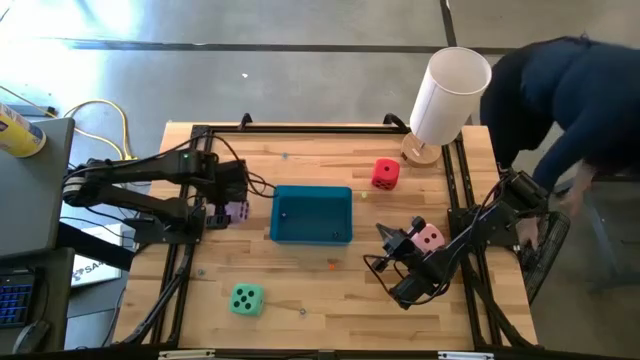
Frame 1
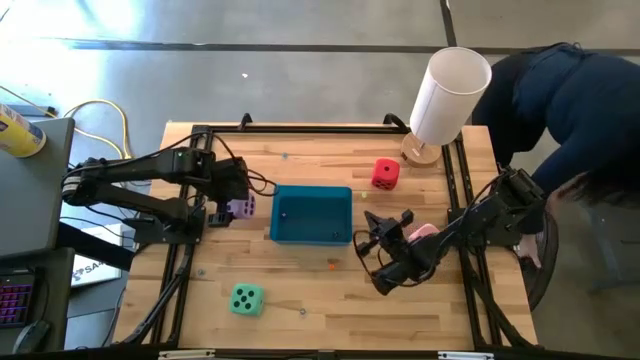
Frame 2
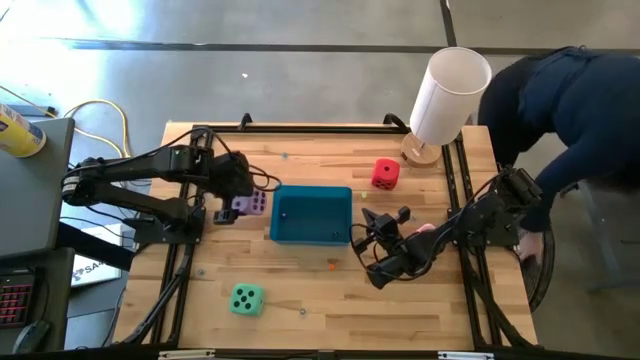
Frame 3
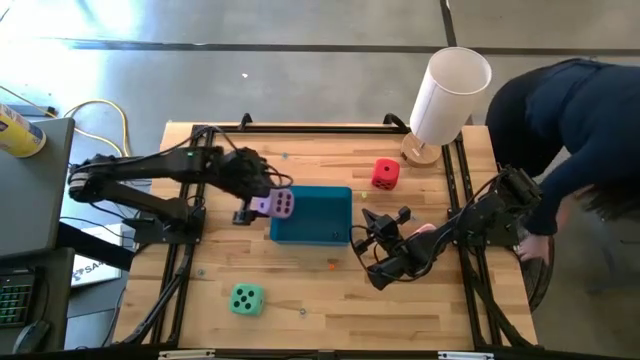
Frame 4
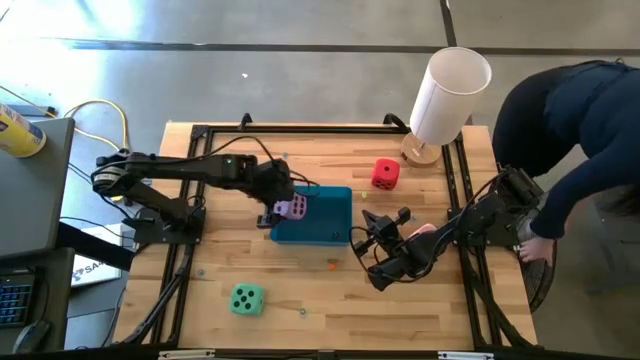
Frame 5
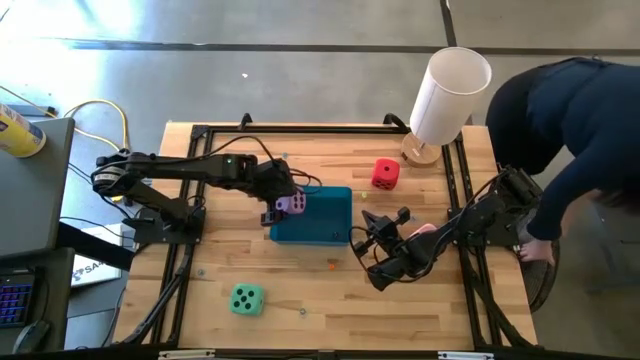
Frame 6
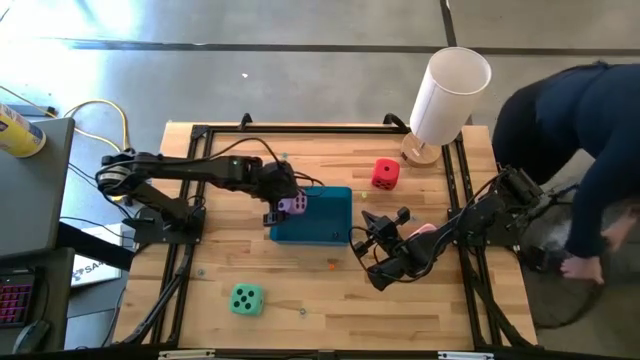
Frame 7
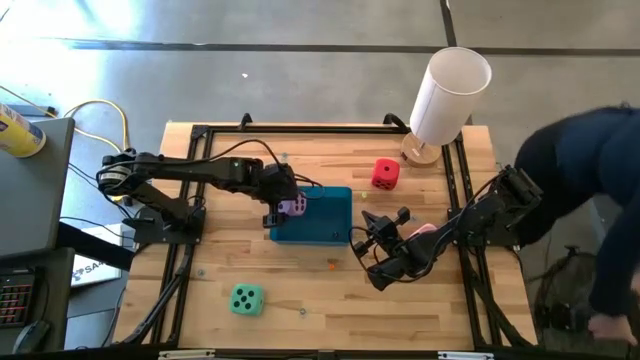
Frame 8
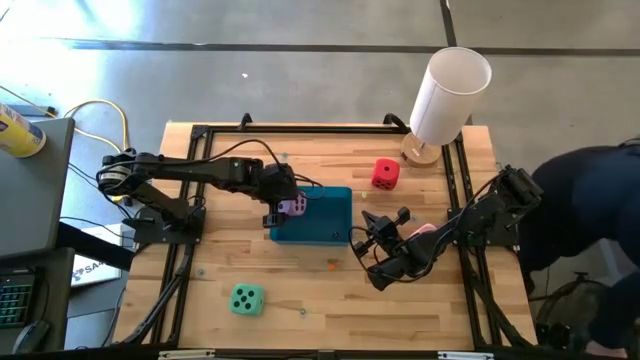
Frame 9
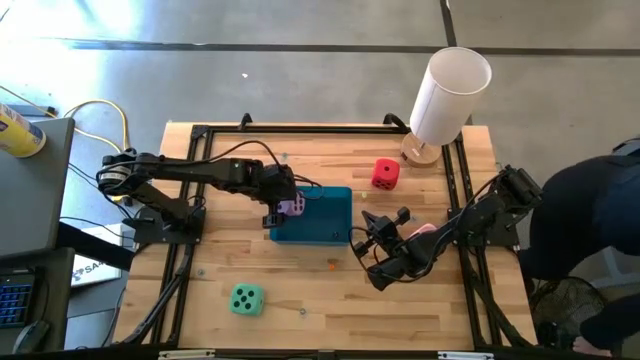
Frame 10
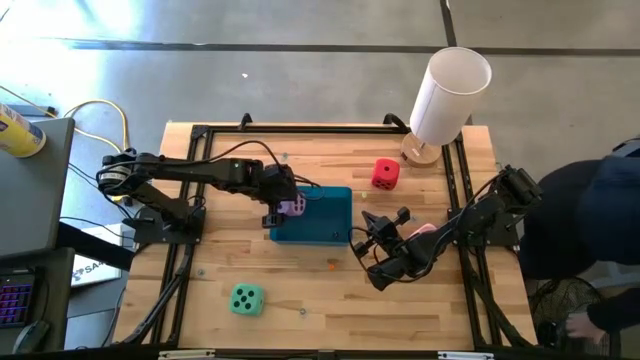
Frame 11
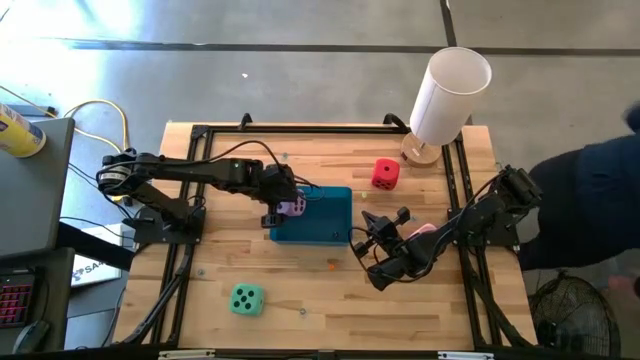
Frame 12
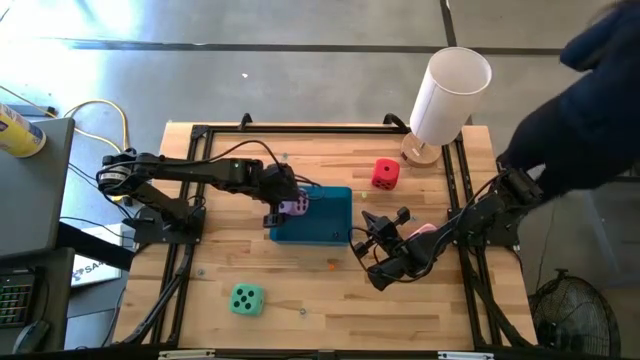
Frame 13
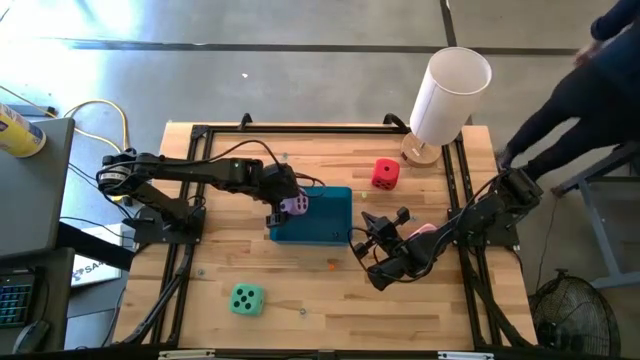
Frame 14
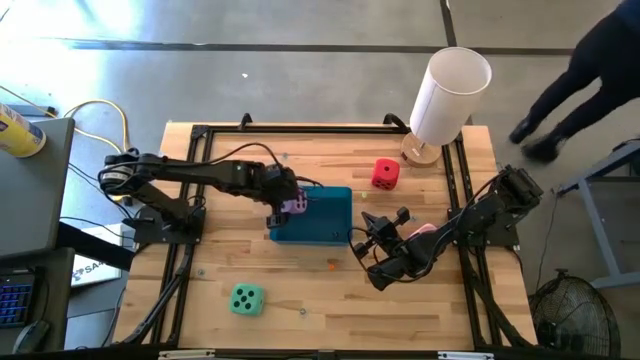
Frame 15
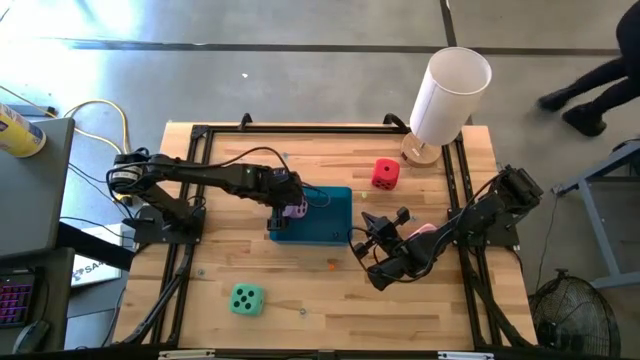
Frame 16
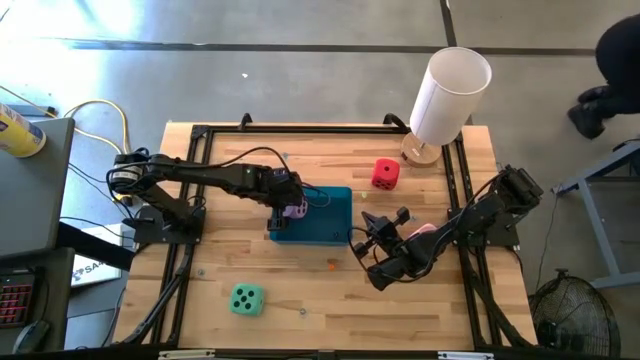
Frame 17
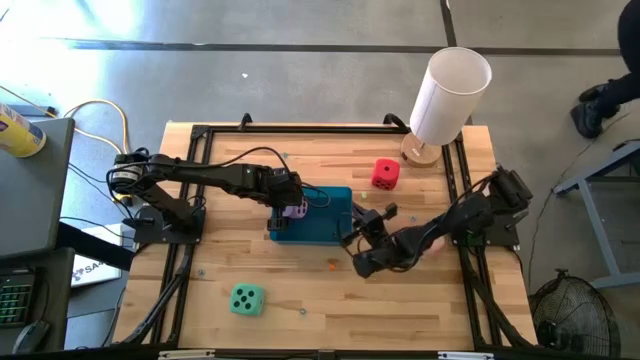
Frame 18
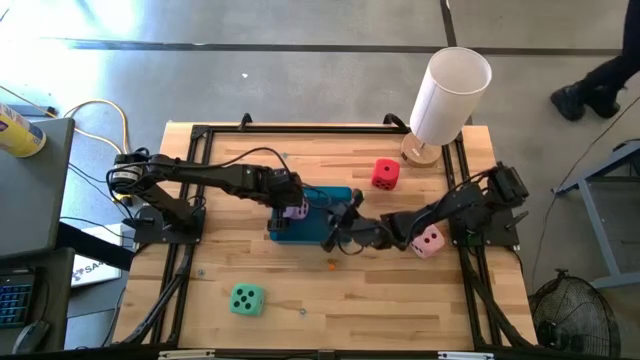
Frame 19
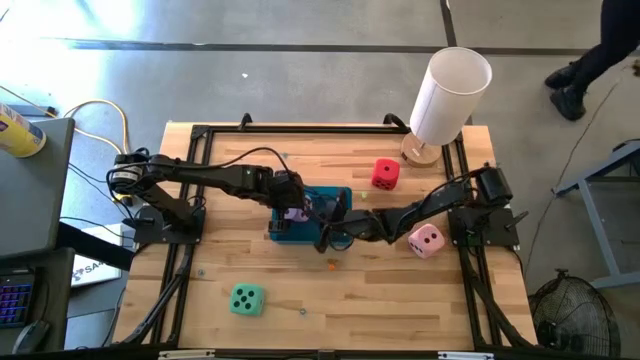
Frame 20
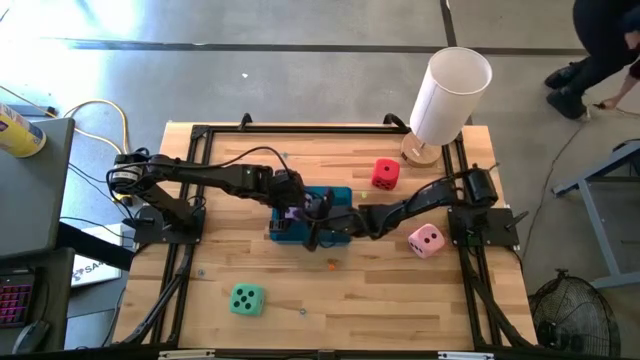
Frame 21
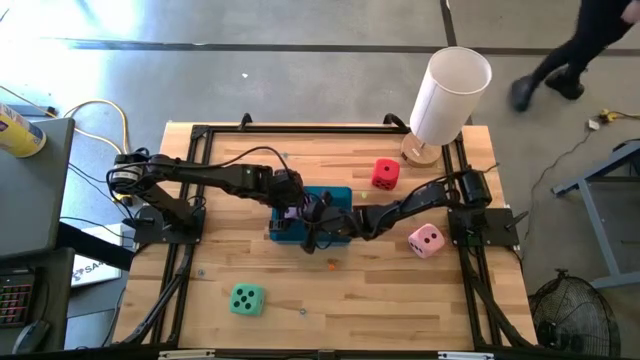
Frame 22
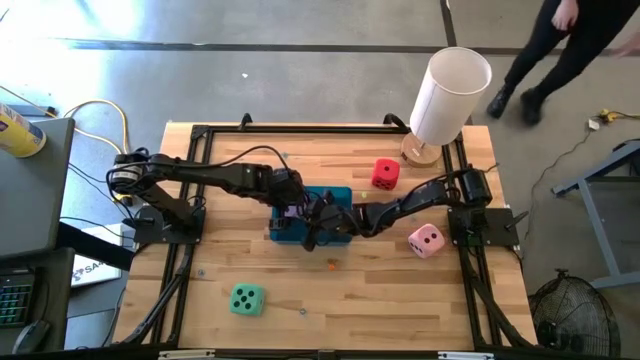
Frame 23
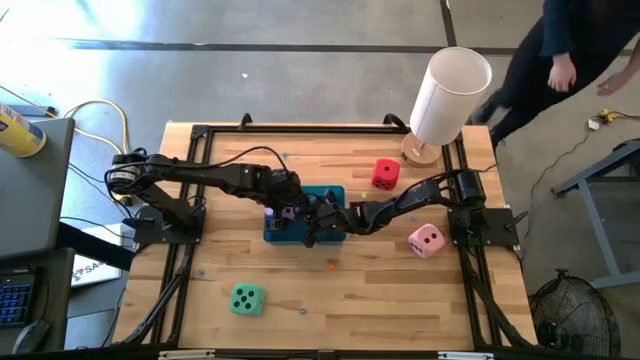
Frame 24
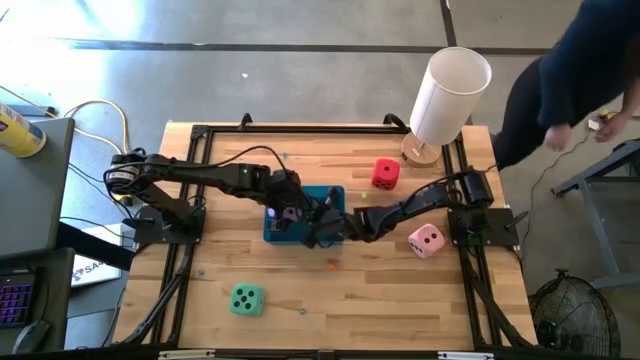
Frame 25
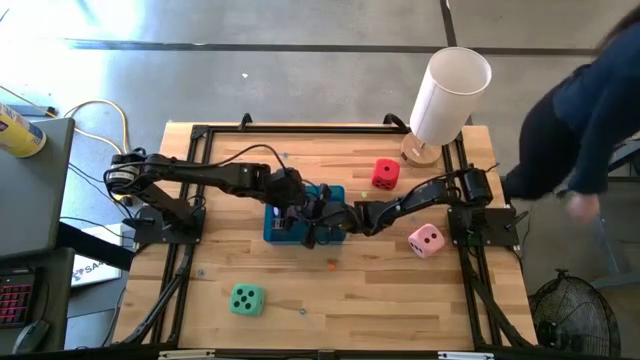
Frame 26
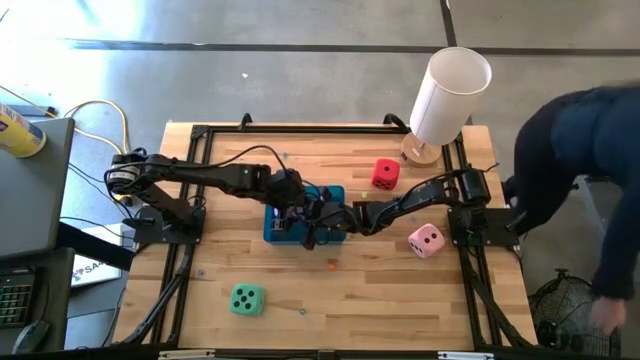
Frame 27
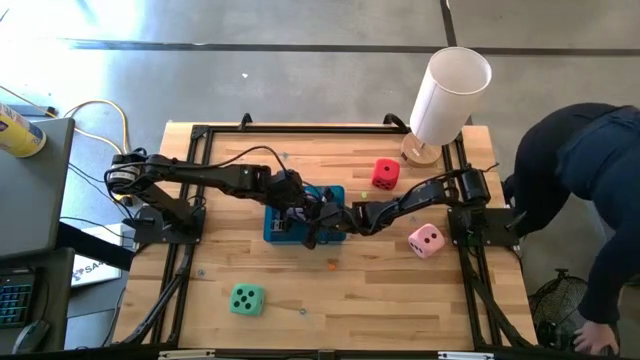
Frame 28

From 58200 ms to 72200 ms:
Task: Pick & Place Dice
Put the large violet dice into the blue bin

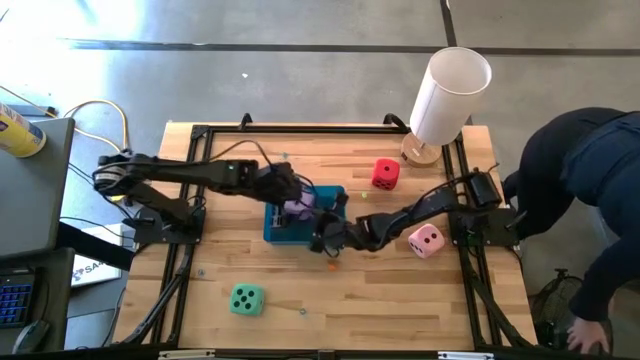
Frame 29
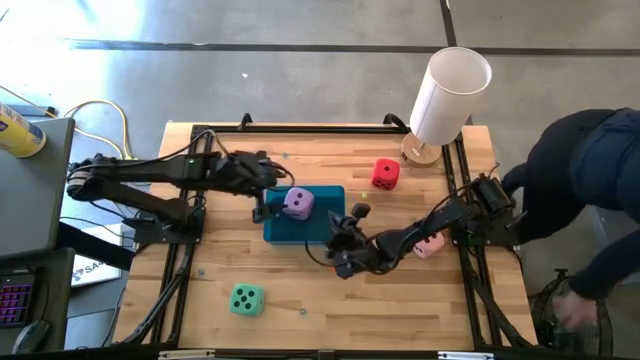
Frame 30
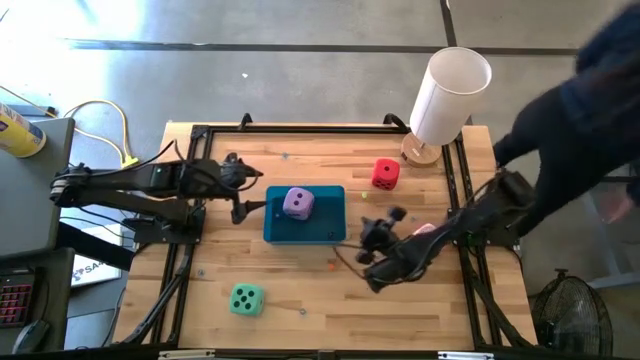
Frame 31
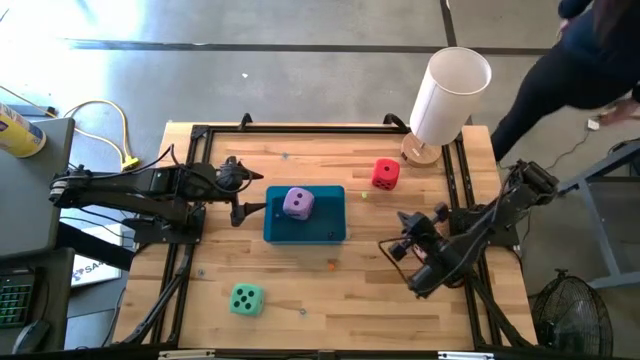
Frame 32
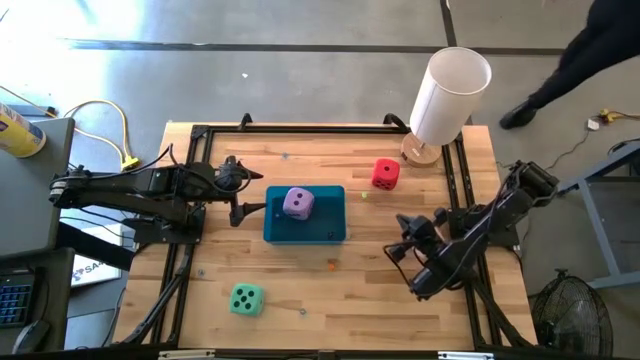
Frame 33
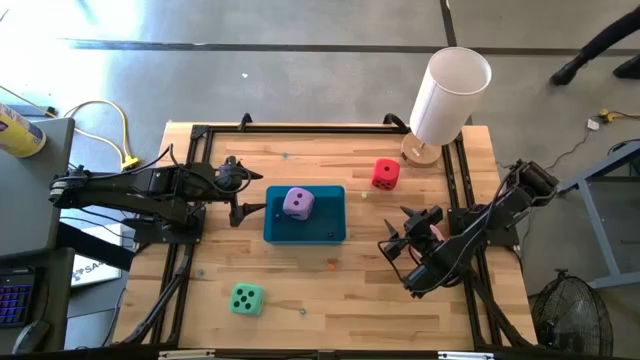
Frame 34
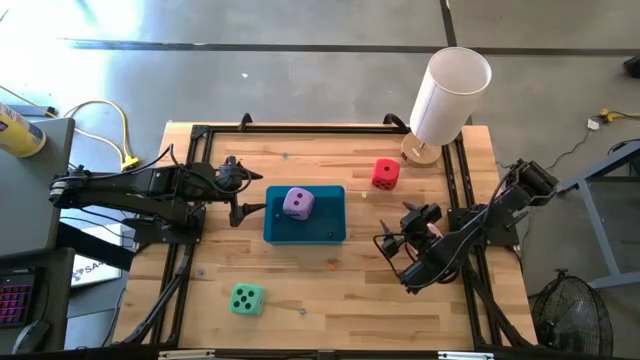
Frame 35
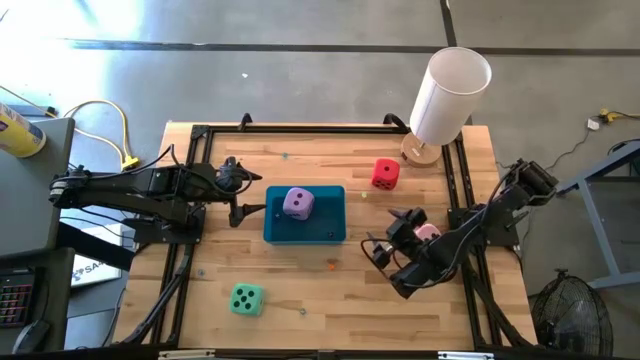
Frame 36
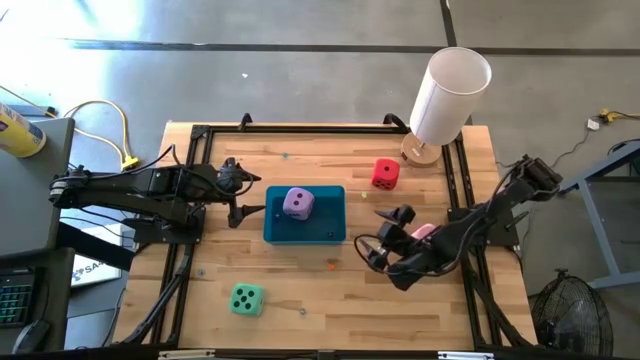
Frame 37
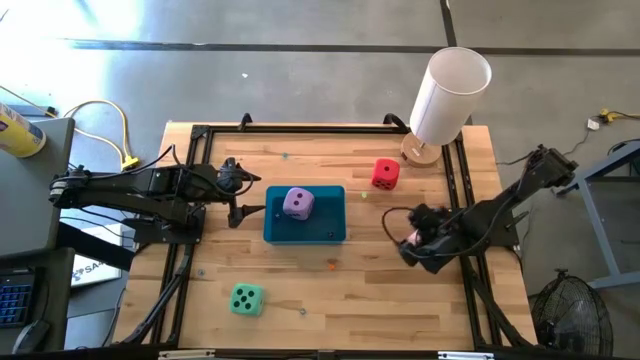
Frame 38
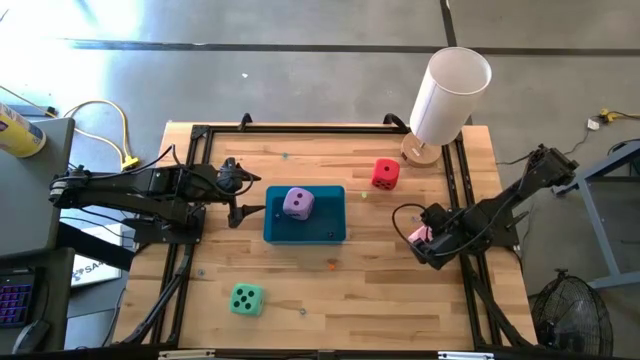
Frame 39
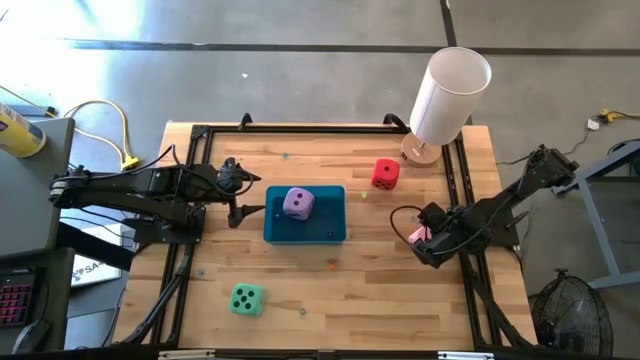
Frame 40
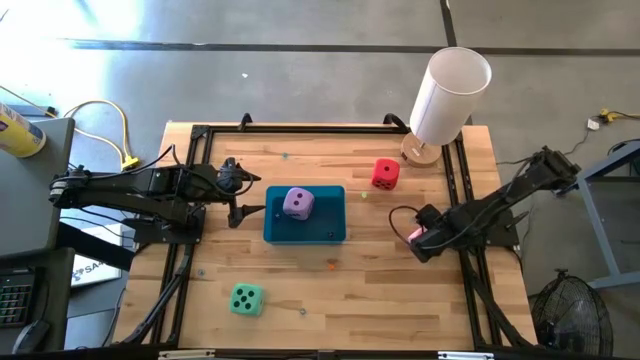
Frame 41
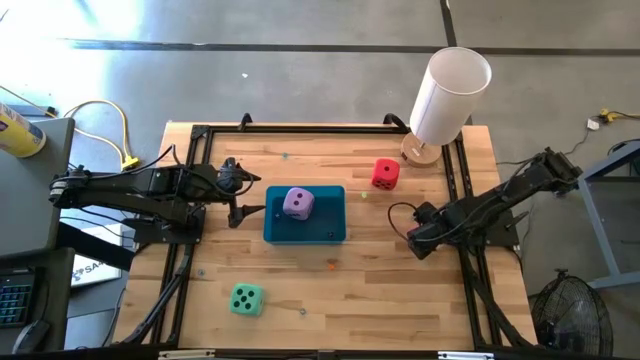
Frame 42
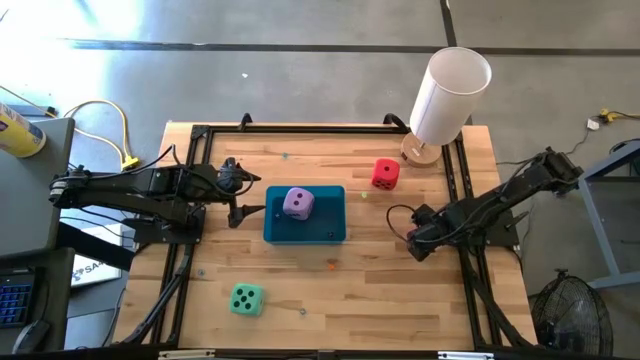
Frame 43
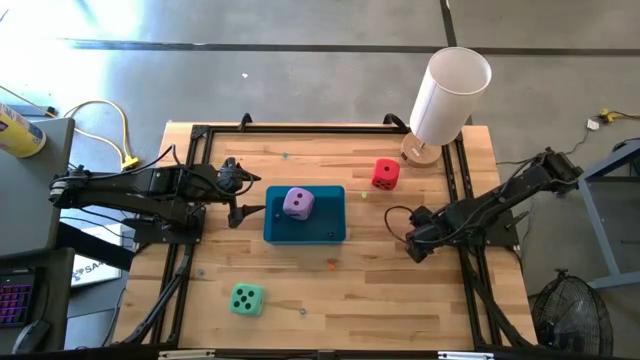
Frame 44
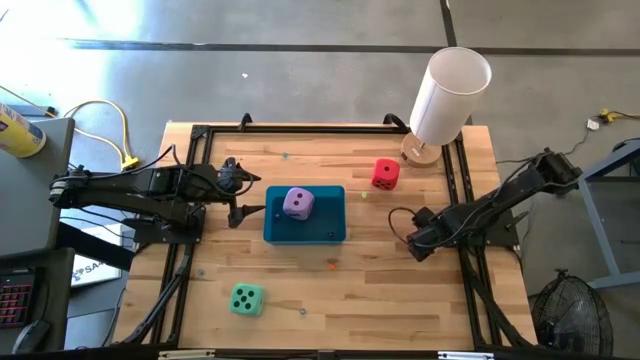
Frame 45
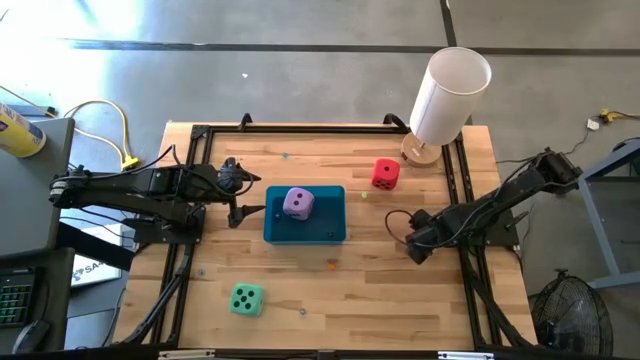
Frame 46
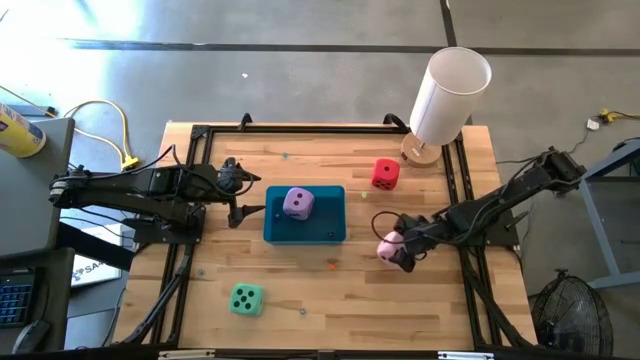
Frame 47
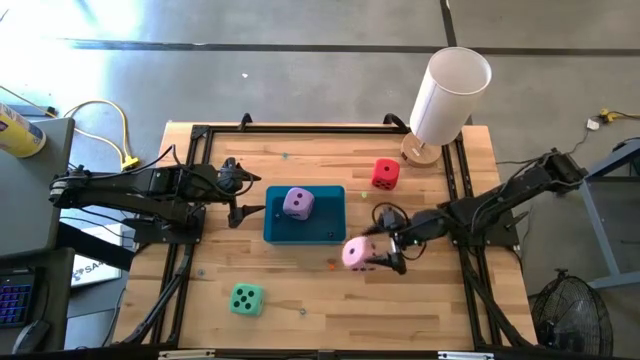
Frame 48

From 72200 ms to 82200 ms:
Put the large purple dice into the blue bin
